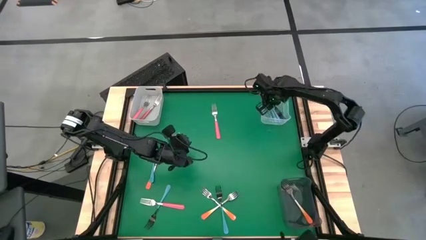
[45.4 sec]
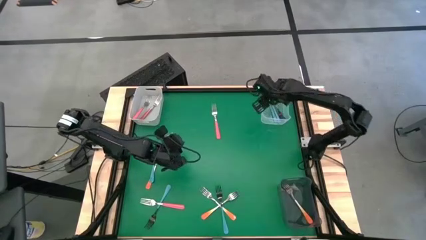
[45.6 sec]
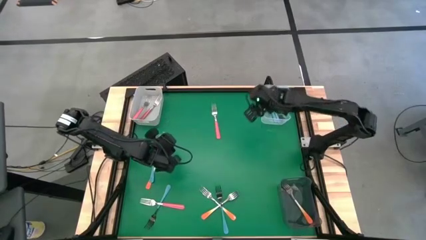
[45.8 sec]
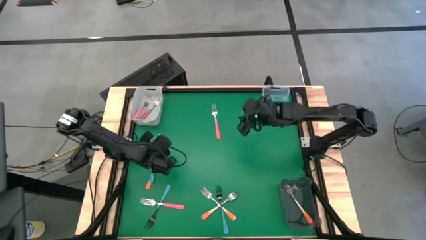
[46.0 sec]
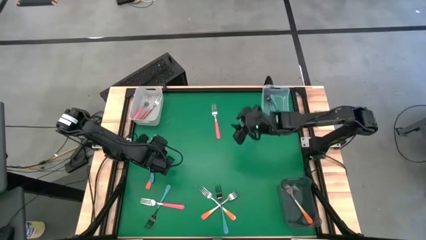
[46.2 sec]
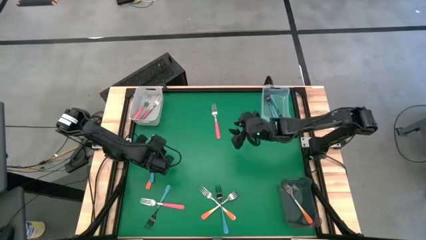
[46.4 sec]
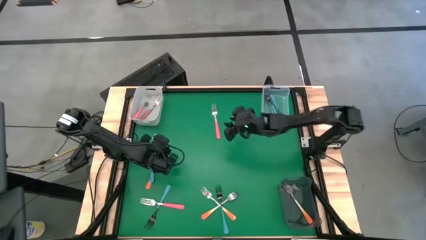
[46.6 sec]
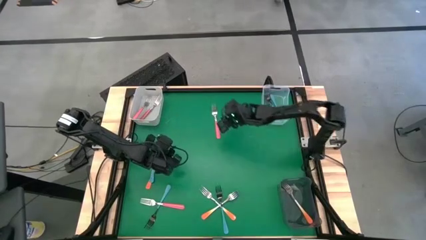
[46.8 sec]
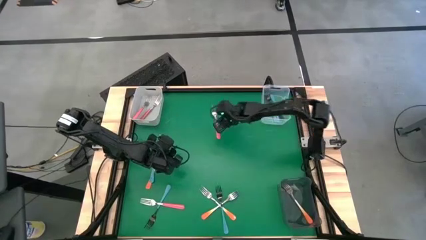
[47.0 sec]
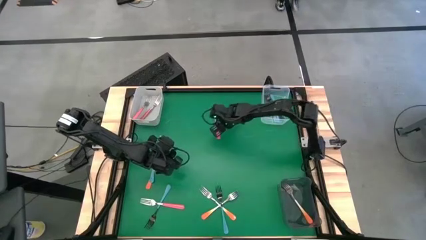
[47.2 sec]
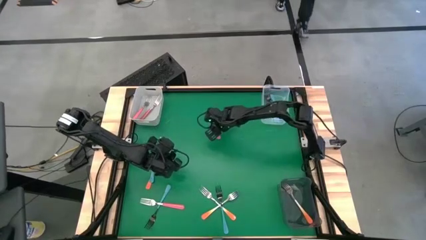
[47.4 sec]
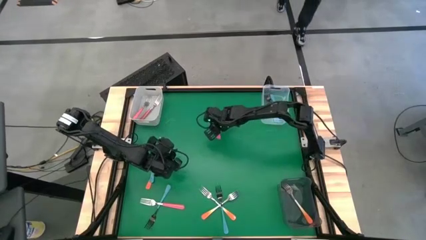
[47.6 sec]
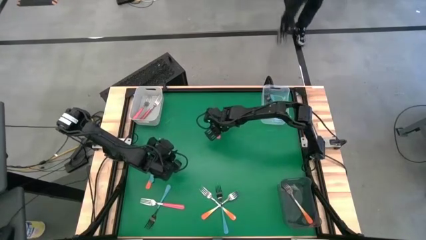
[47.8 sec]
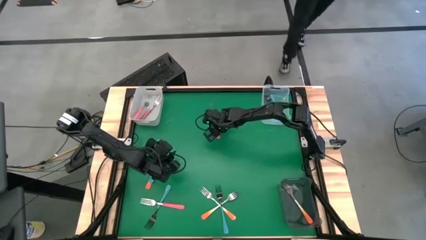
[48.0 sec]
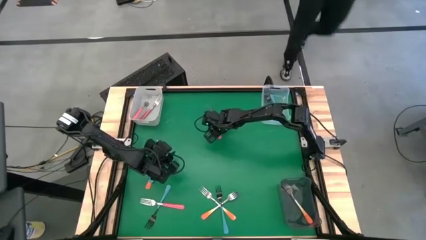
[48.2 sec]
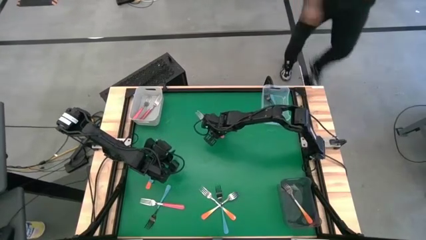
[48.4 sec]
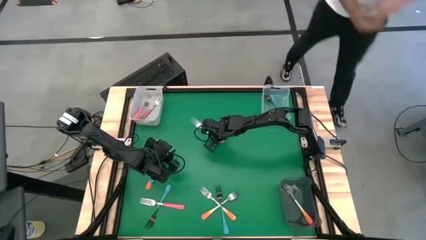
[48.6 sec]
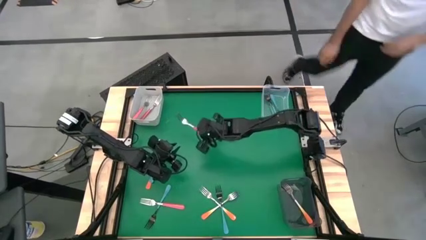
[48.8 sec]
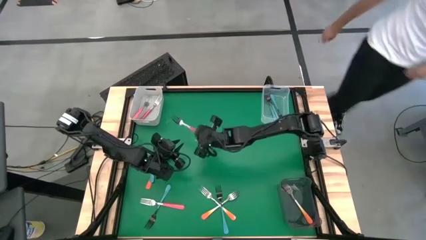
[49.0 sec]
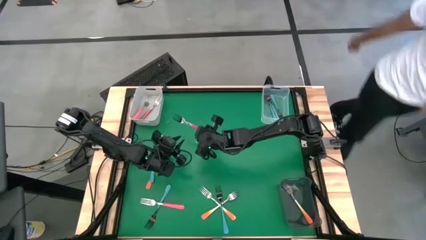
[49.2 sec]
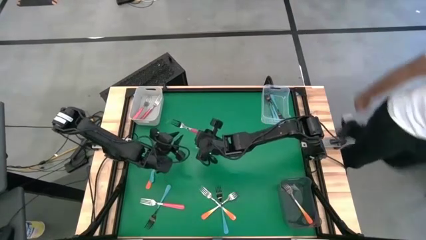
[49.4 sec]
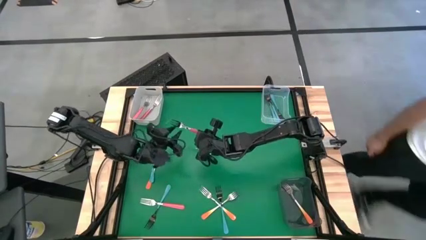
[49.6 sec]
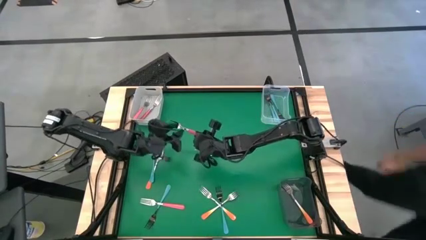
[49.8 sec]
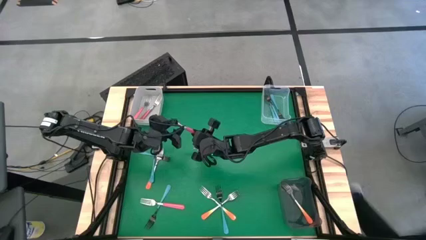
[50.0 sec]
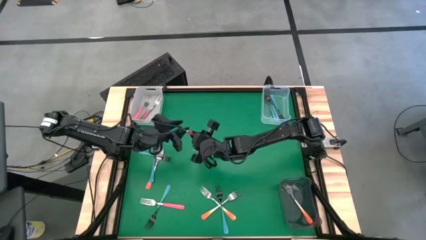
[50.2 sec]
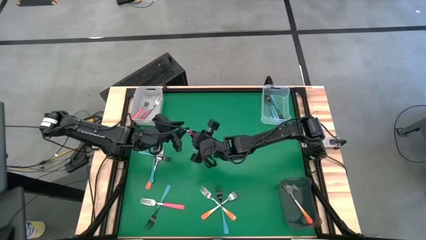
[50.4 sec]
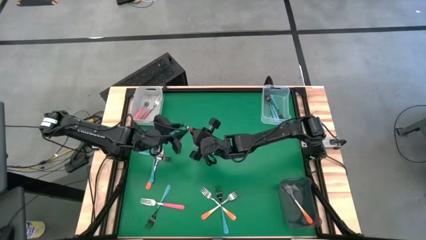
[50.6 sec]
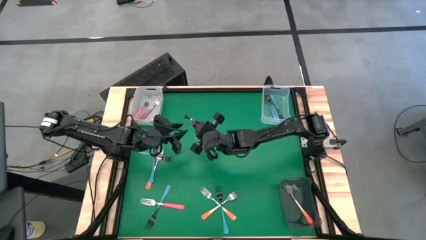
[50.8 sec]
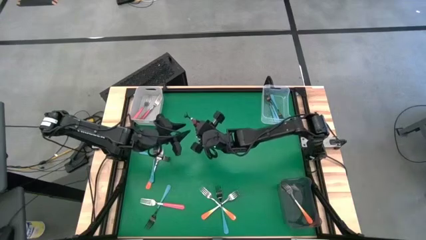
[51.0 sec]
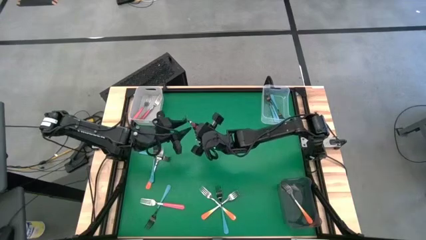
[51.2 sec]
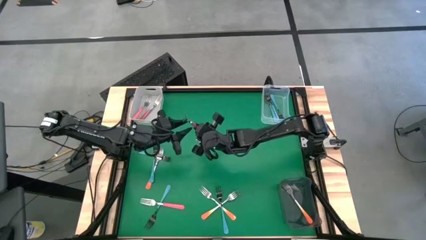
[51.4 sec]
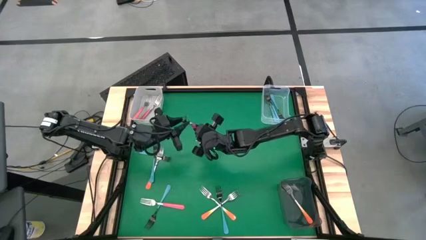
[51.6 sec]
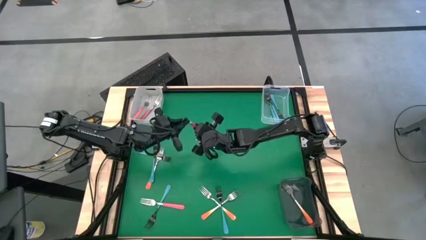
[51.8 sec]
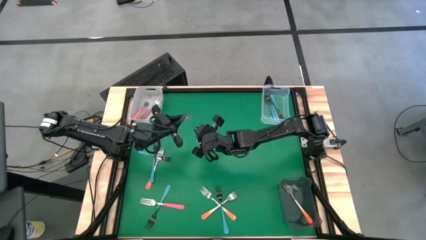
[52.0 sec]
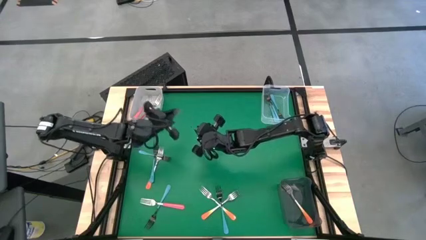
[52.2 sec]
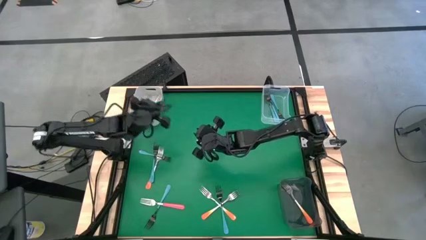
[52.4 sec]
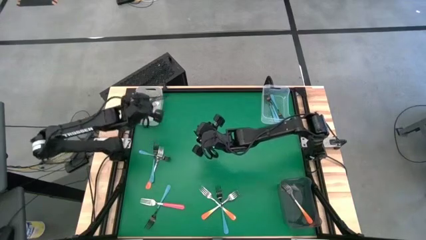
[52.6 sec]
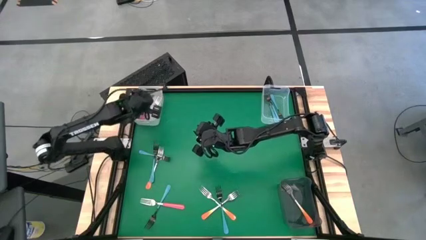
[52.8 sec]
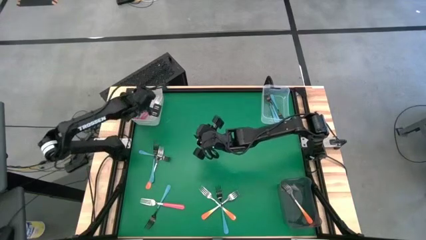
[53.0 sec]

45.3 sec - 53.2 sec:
Task: Sort silverware by color (type)
Put the pink fork into the white bin

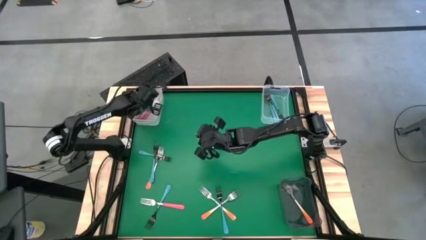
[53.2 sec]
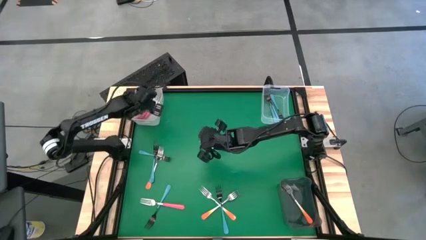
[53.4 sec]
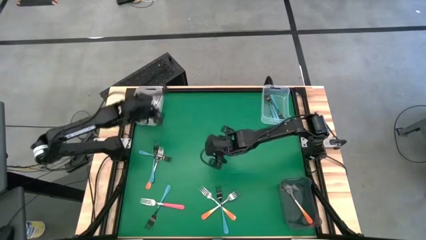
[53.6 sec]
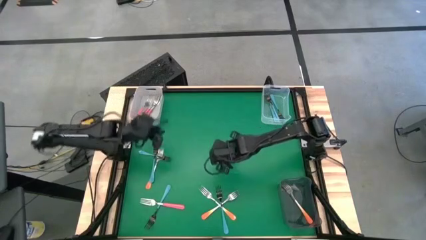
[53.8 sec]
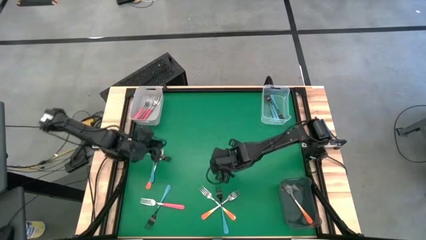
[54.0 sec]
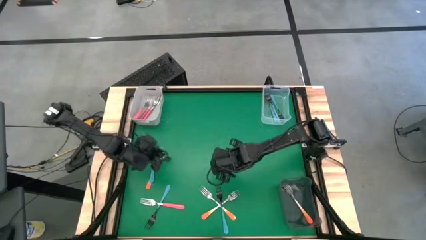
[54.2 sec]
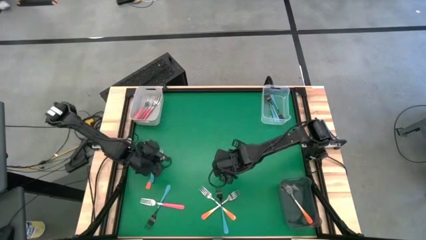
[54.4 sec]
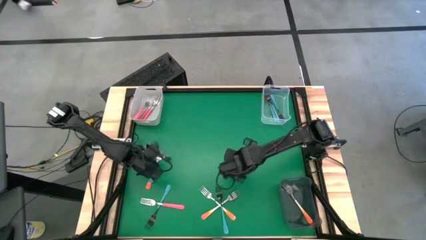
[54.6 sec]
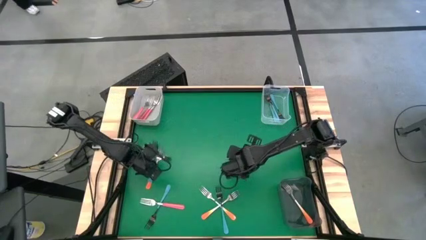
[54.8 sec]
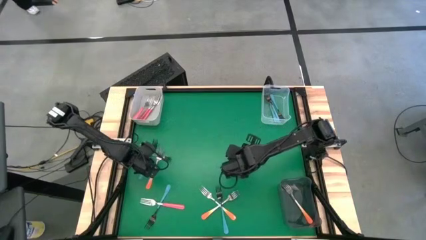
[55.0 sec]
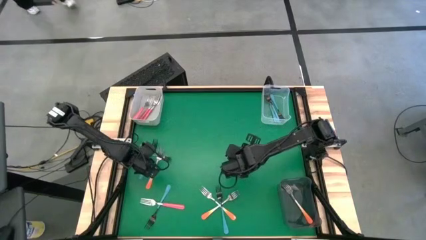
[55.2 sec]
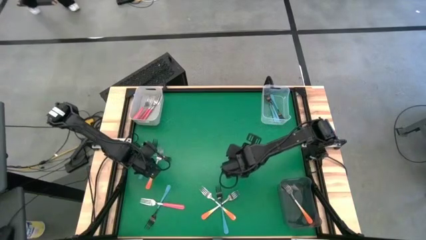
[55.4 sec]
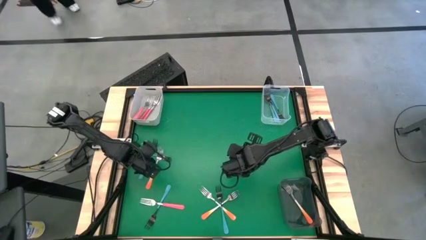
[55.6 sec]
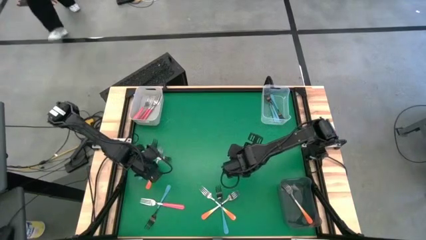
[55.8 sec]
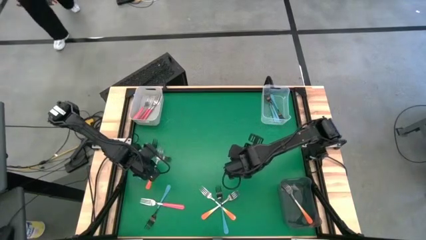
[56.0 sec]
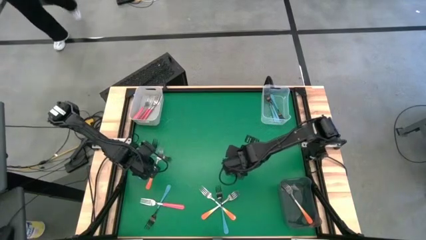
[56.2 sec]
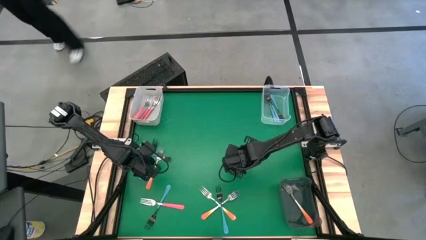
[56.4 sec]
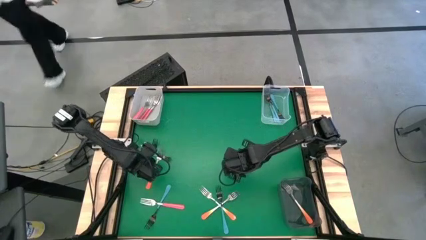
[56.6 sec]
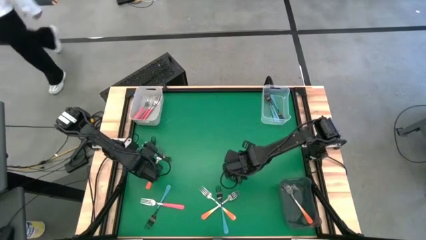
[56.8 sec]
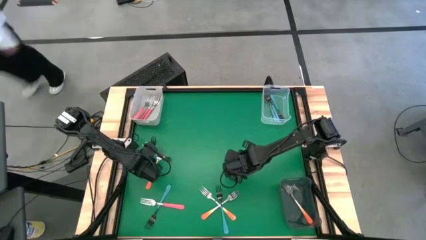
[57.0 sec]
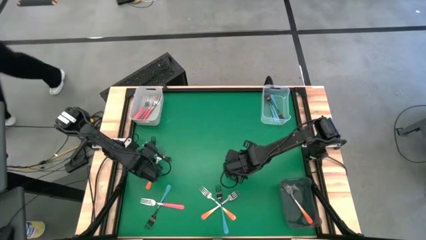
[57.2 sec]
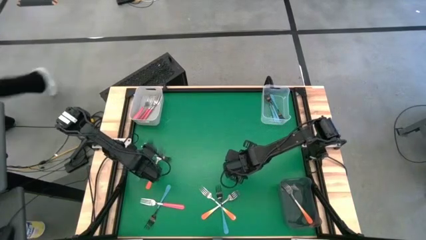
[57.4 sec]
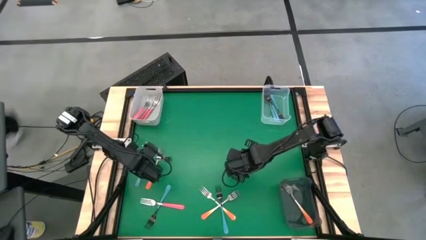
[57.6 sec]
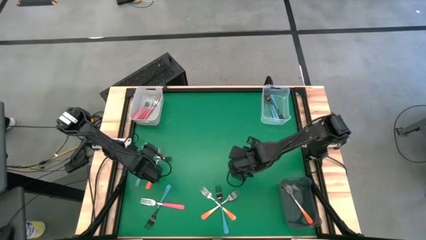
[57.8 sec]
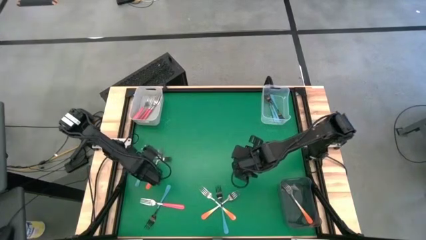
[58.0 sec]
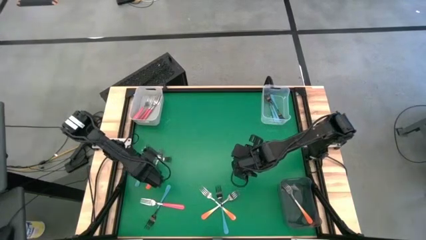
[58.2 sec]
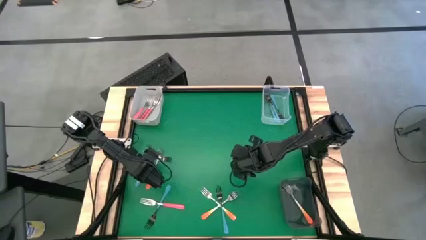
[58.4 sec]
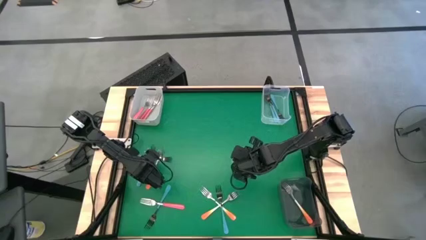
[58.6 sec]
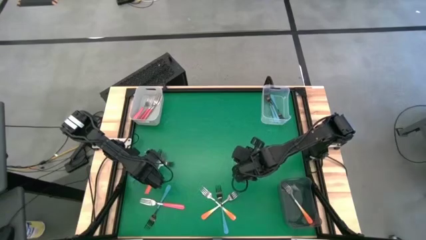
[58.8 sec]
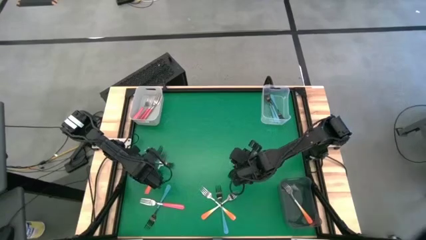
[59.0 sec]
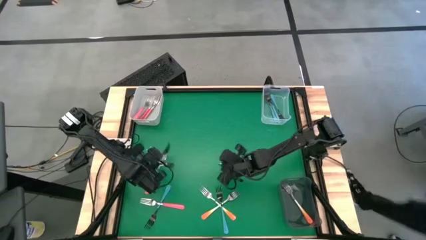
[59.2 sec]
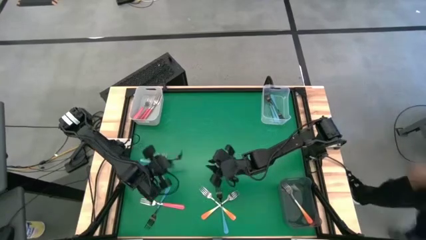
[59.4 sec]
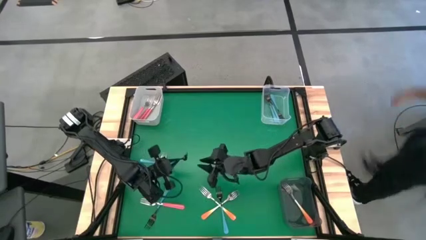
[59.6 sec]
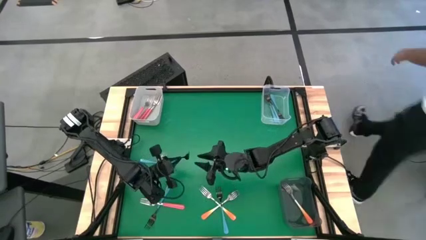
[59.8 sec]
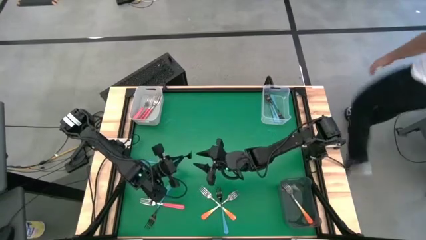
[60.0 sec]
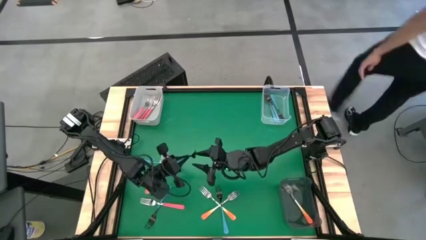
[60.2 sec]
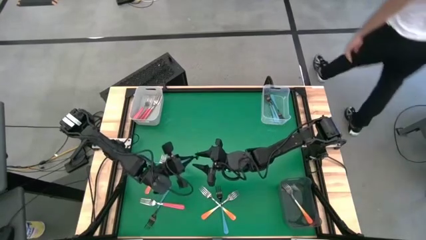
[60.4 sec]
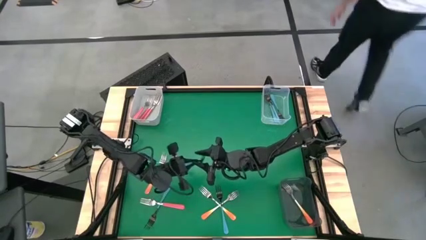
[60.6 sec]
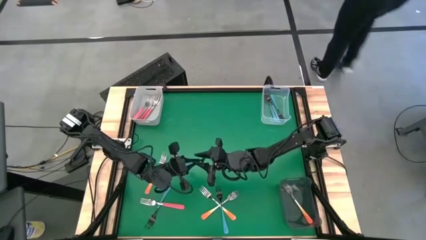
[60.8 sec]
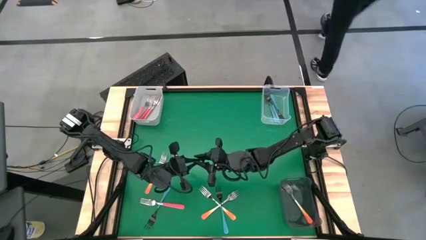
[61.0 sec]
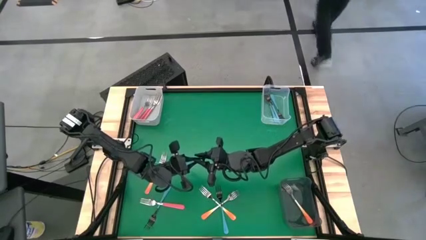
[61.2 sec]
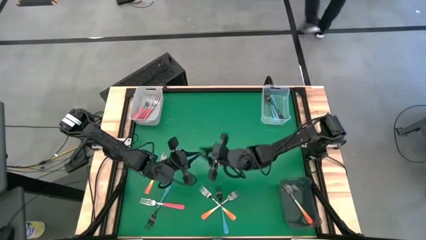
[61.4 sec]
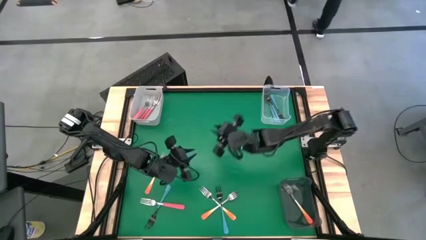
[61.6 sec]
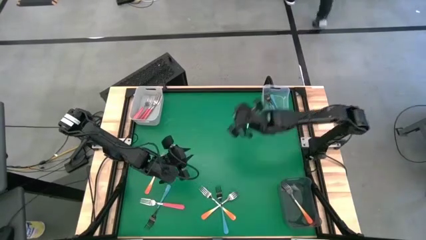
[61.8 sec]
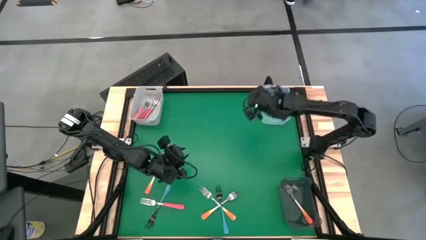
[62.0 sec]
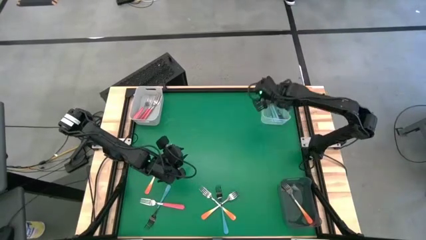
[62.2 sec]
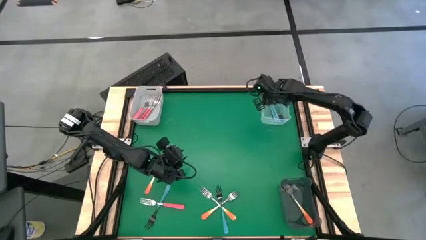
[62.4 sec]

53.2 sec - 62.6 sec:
Put the blue fork into the transparent bin
